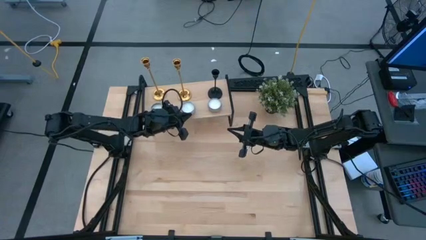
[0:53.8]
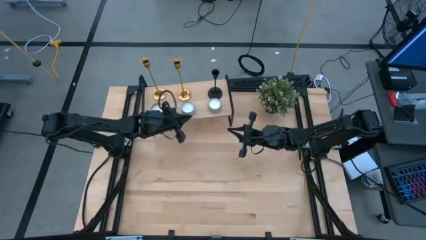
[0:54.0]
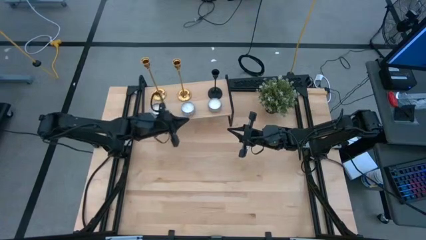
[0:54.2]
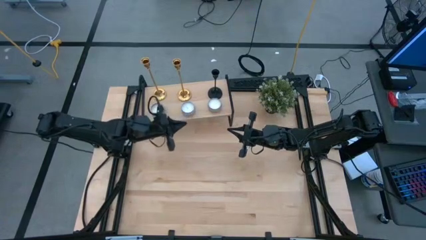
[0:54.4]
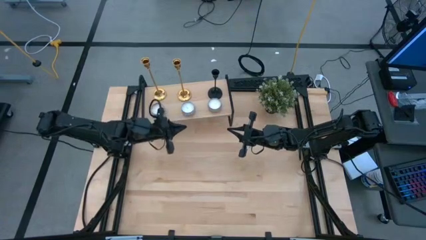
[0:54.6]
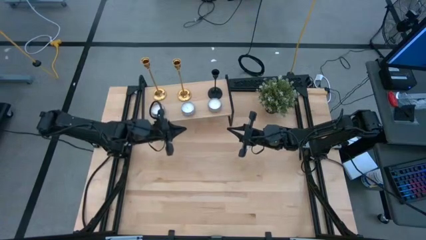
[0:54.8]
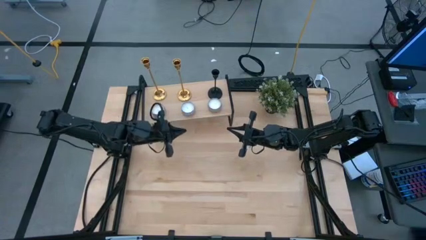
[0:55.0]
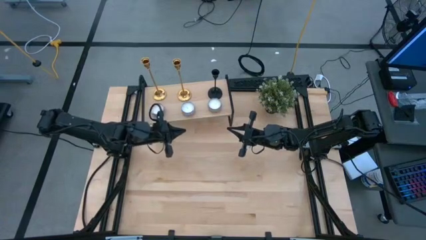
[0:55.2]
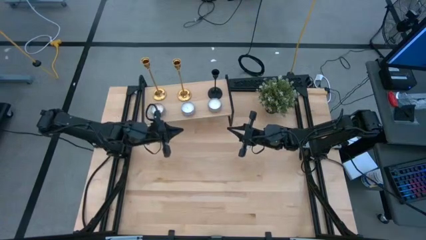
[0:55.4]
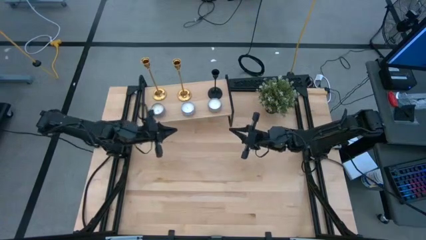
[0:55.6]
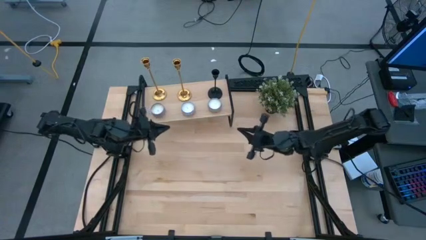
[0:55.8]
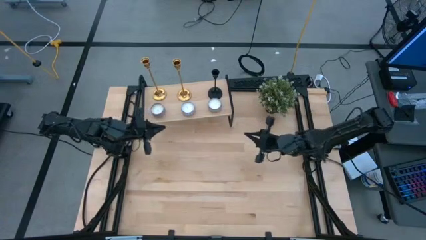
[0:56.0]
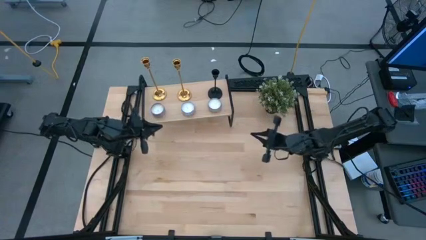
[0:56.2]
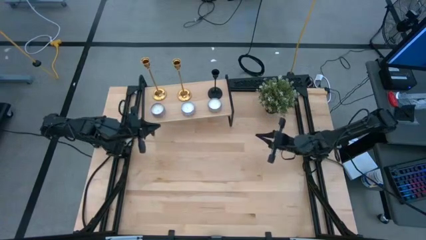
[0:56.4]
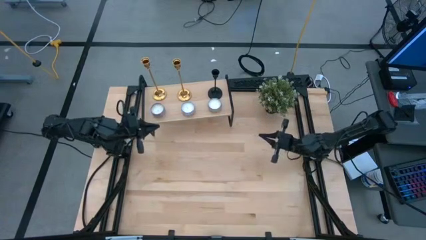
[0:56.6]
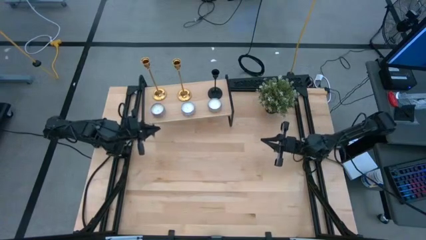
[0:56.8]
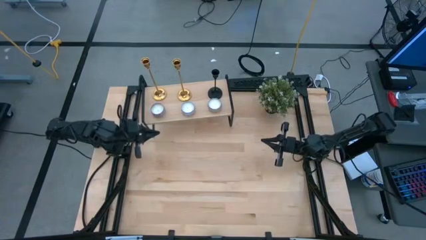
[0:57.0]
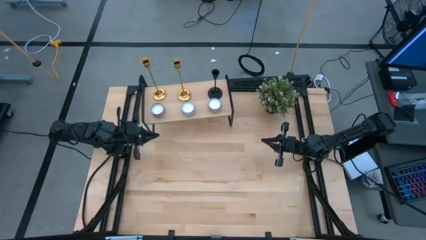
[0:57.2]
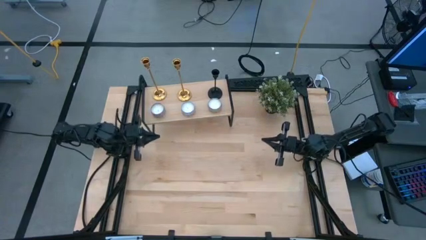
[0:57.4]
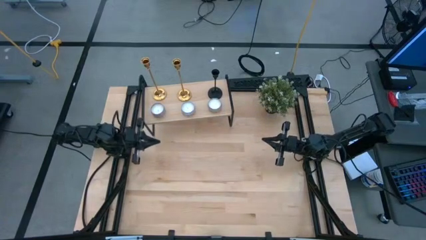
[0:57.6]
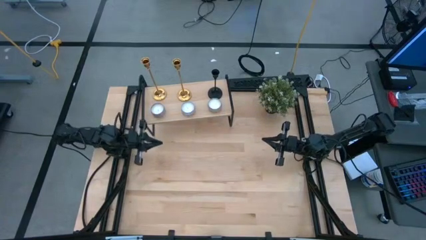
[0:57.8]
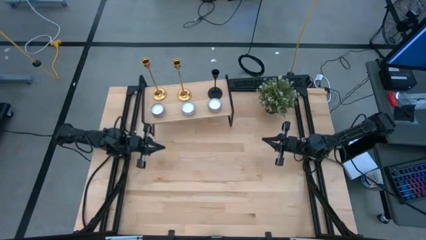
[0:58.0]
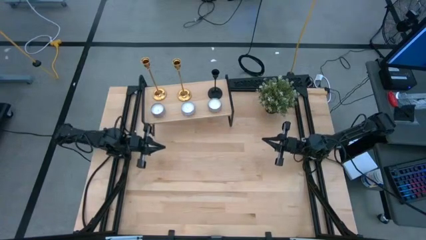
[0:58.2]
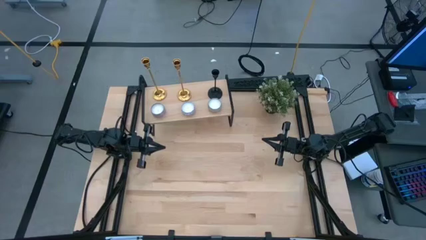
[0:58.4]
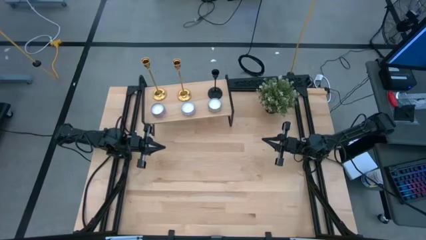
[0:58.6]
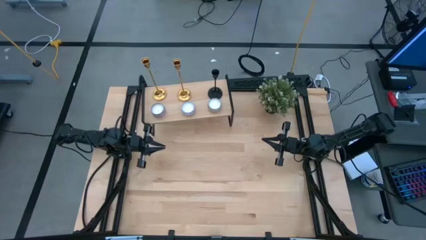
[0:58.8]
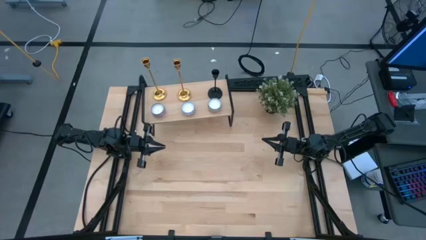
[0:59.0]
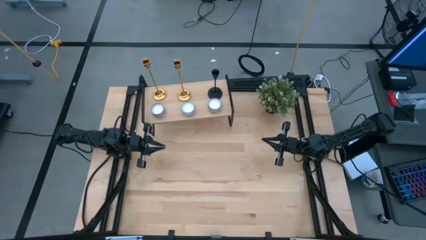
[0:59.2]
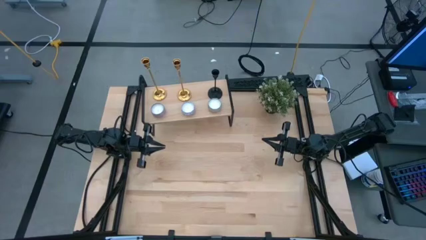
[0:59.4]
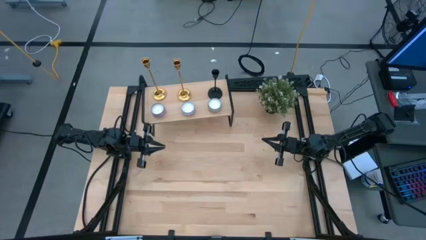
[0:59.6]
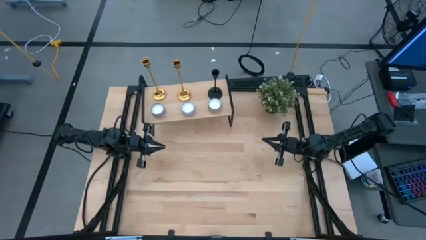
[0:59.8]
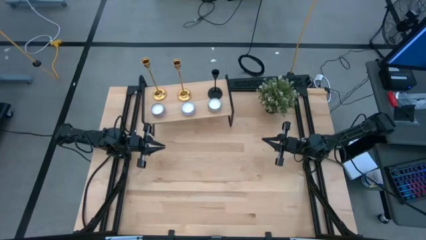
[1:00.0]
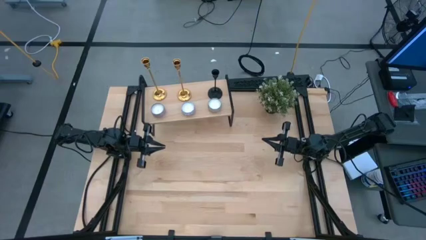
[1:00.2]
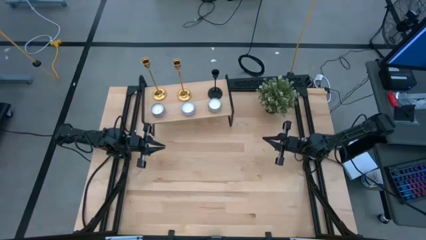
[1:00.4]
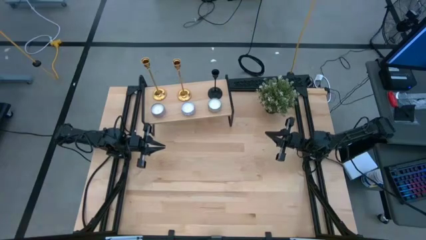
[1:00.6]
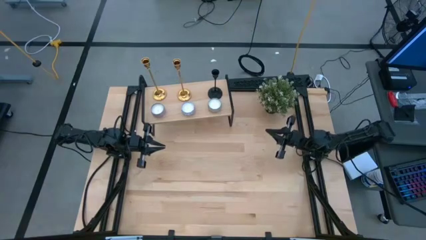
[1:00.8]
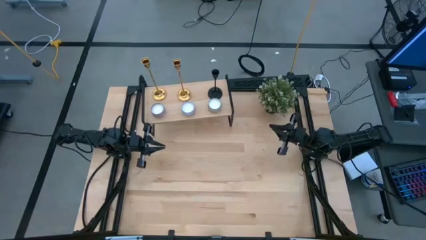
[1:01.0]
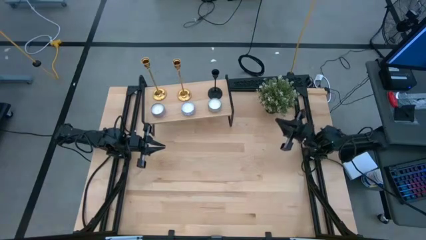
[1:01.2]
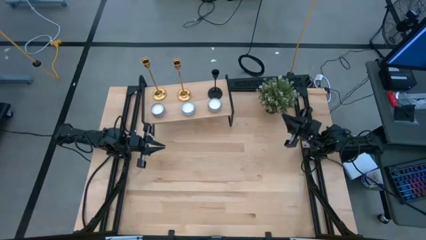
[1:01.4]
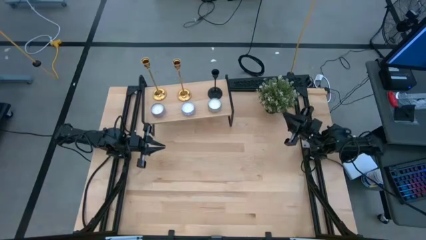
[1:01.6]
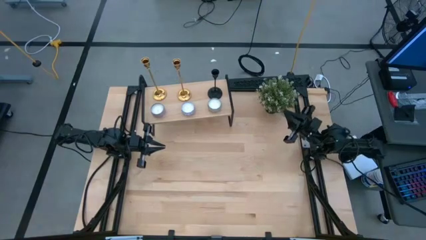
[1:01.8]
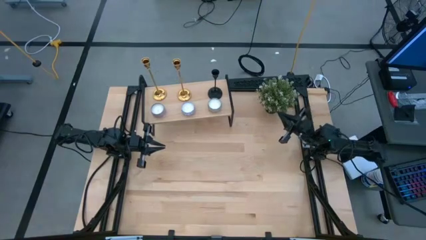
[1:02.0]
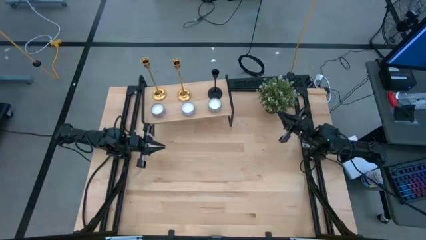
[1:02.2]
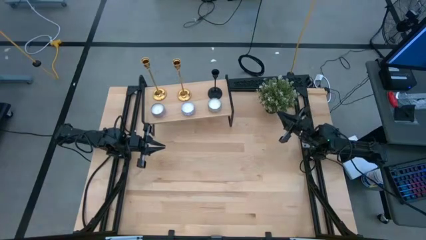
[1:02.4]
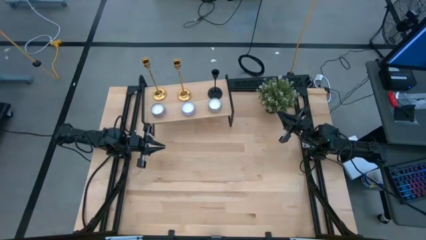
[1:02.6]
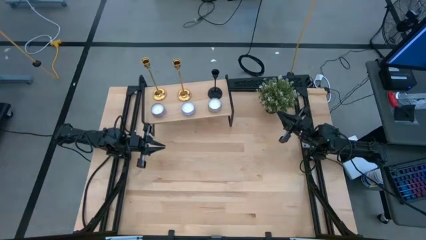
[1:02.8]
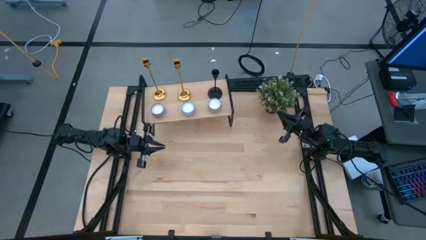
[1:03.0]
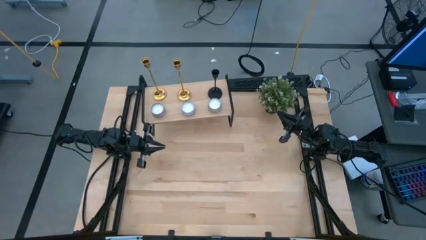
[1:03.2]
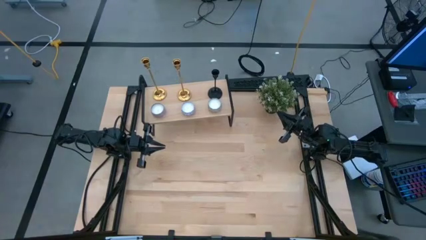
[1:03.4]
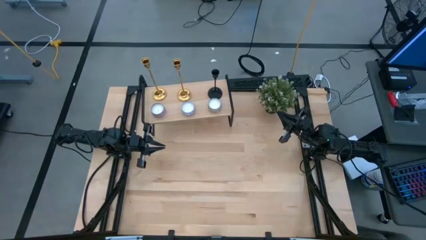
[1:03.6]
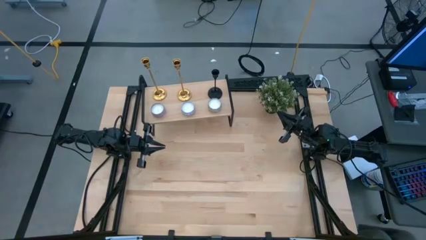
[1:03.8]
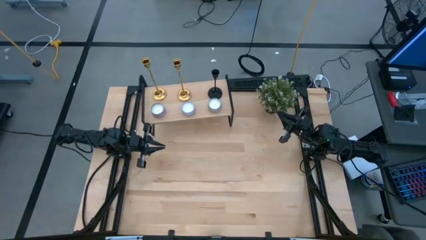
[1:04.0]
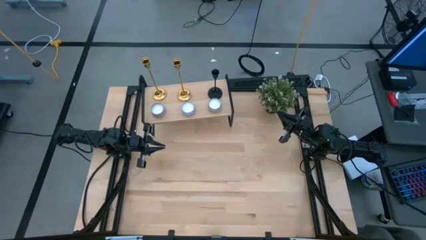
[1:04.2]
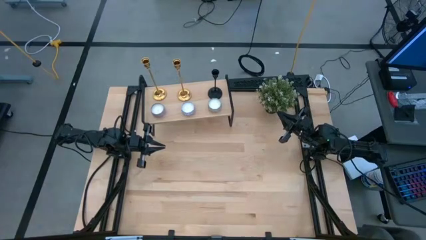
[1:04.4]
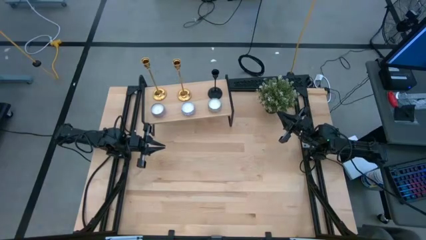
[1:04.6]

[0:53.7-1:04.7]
Task: Pick & Place candle stick holders
Return to Home Position
